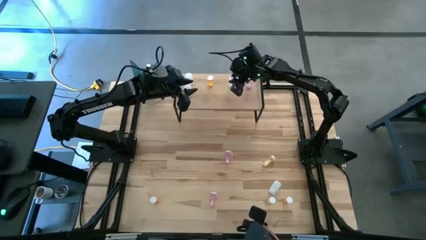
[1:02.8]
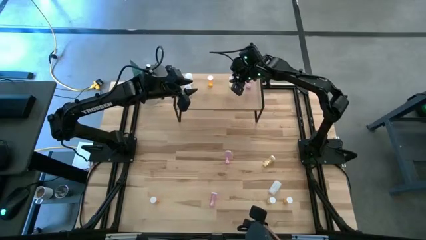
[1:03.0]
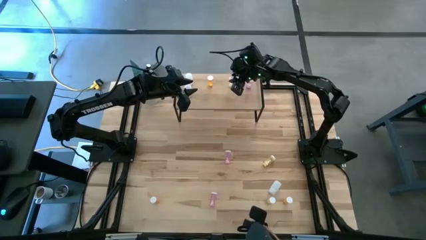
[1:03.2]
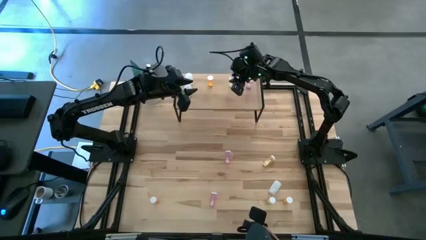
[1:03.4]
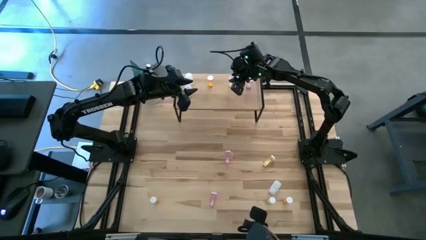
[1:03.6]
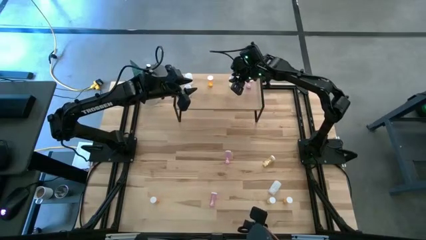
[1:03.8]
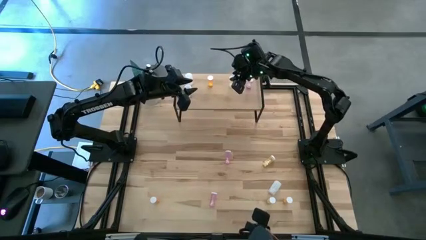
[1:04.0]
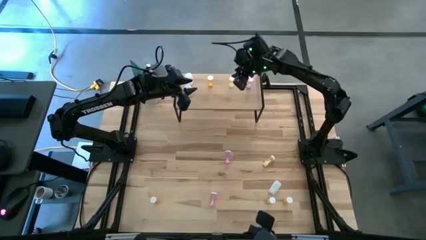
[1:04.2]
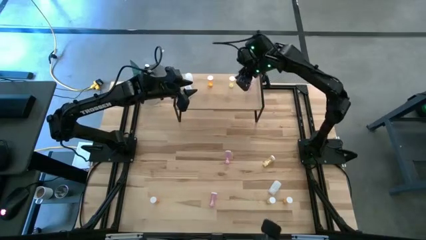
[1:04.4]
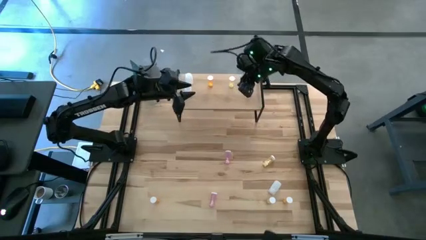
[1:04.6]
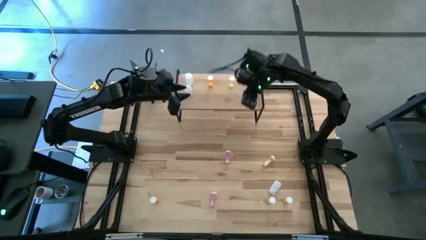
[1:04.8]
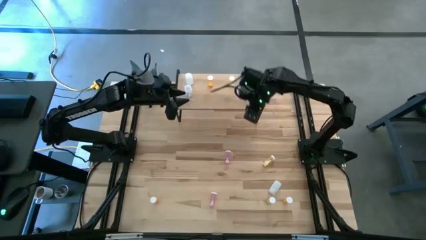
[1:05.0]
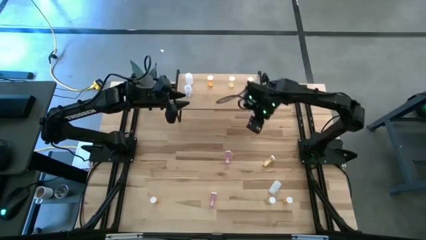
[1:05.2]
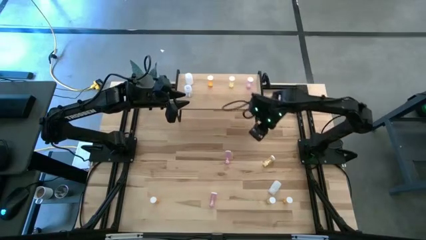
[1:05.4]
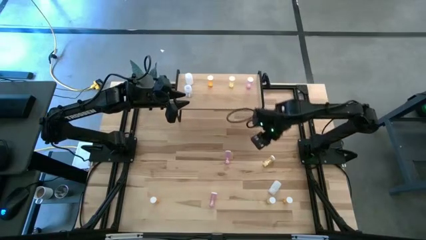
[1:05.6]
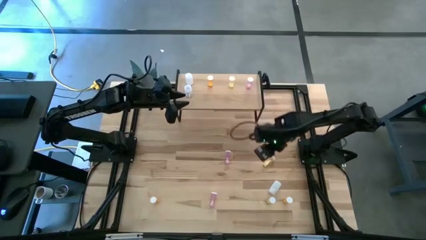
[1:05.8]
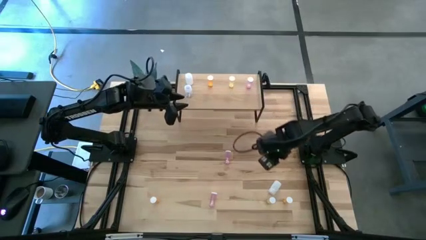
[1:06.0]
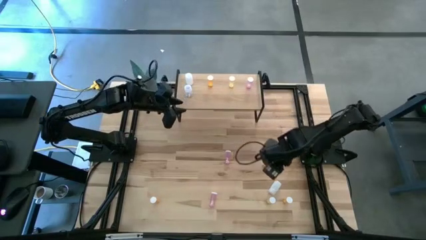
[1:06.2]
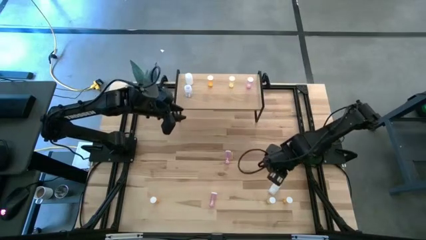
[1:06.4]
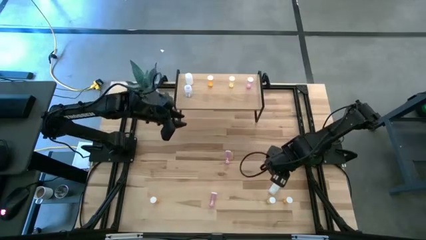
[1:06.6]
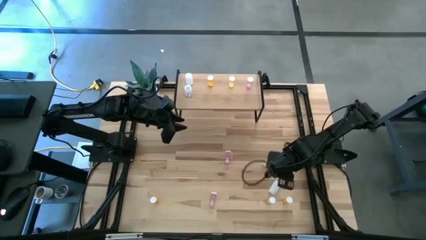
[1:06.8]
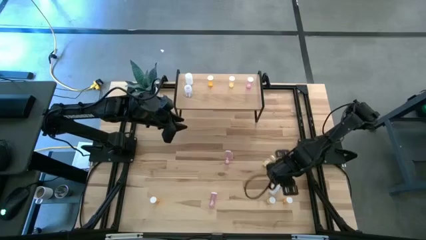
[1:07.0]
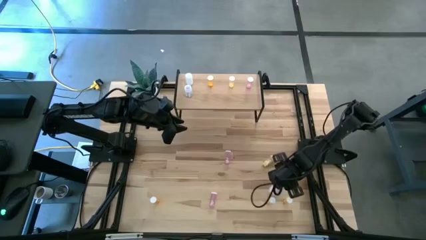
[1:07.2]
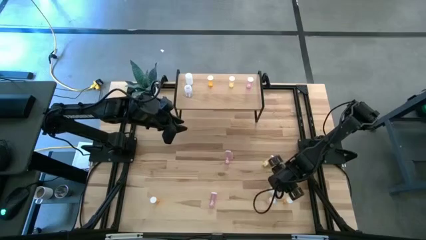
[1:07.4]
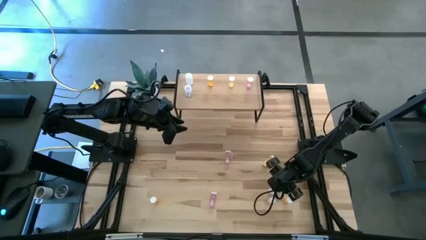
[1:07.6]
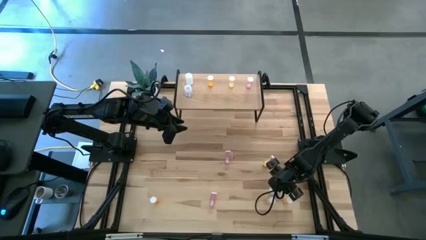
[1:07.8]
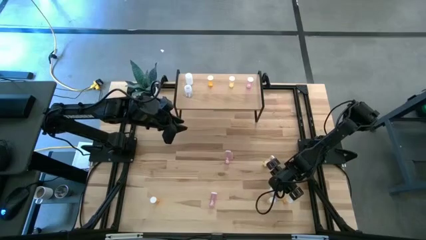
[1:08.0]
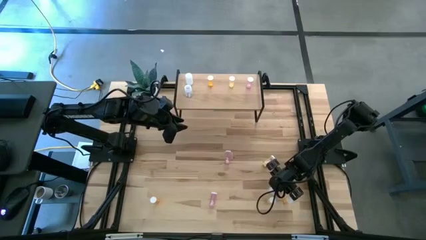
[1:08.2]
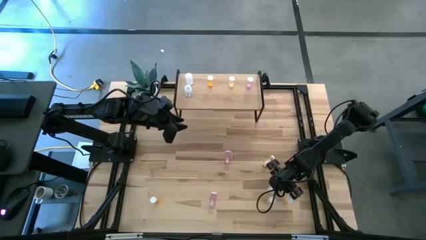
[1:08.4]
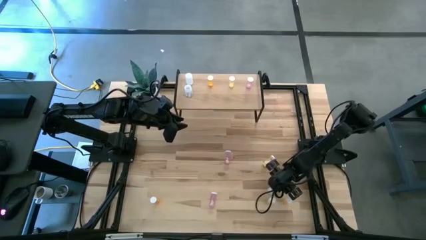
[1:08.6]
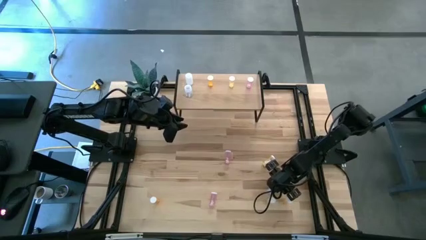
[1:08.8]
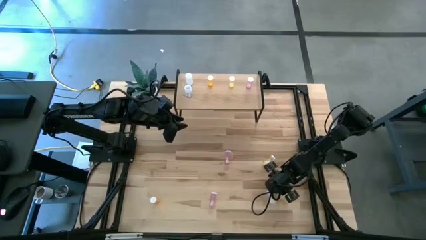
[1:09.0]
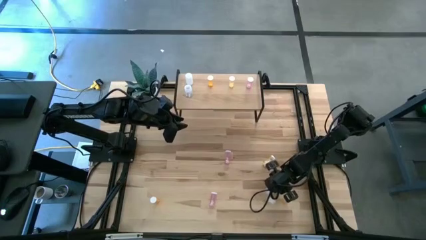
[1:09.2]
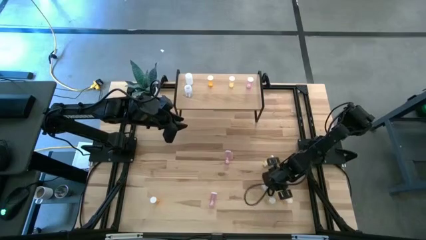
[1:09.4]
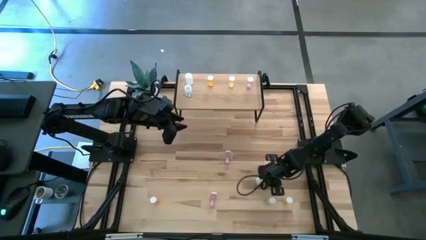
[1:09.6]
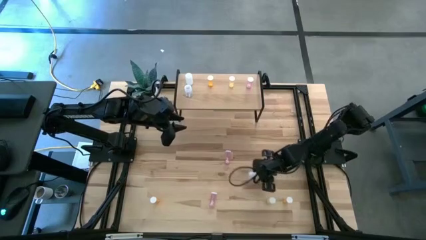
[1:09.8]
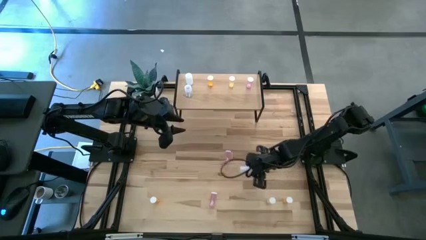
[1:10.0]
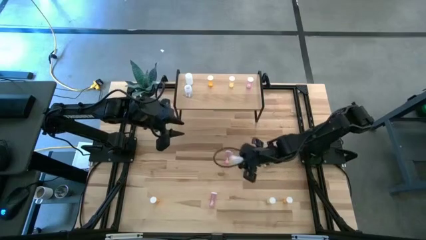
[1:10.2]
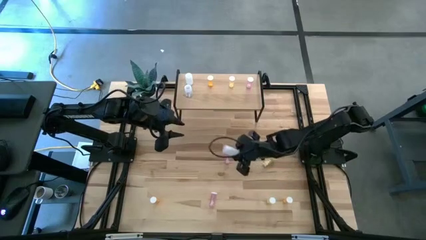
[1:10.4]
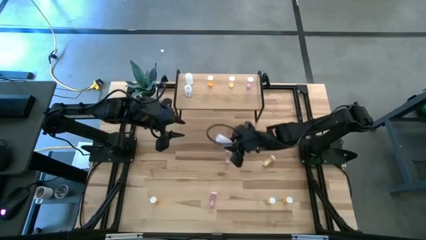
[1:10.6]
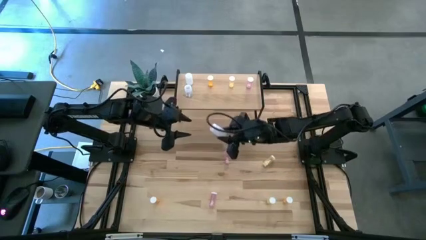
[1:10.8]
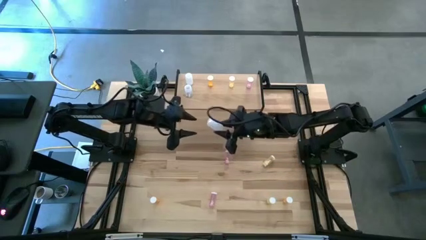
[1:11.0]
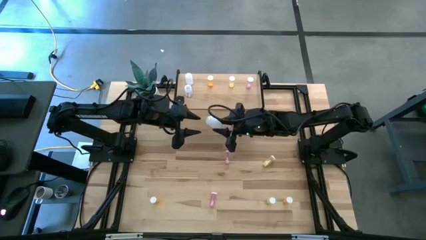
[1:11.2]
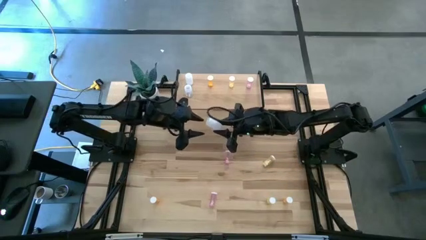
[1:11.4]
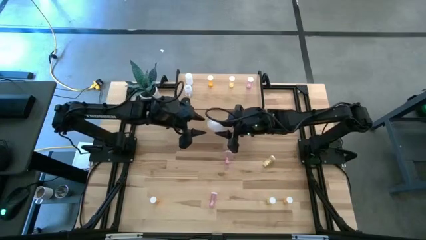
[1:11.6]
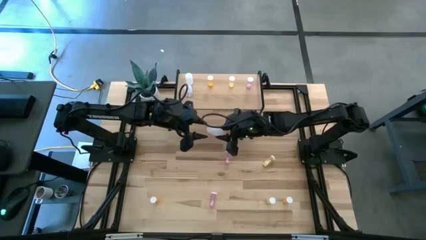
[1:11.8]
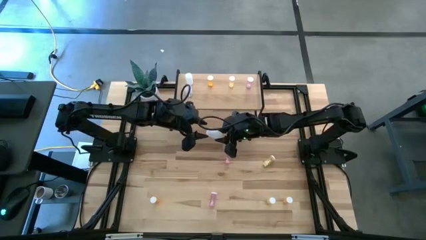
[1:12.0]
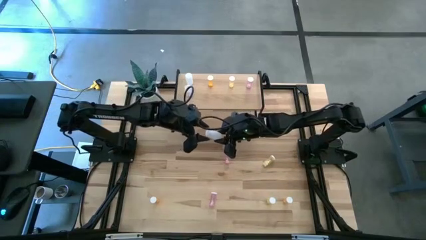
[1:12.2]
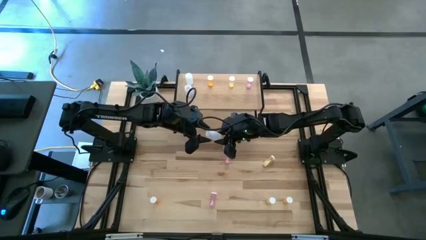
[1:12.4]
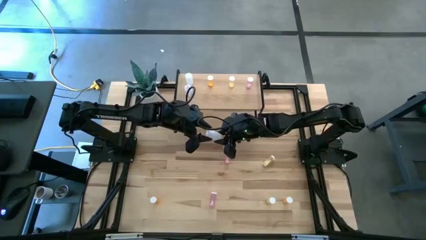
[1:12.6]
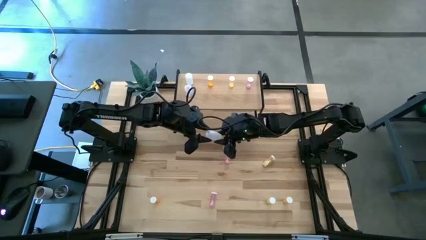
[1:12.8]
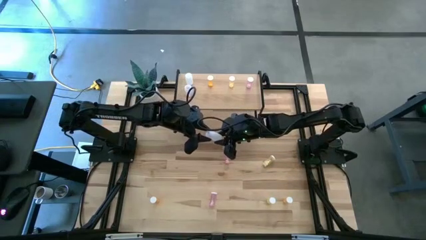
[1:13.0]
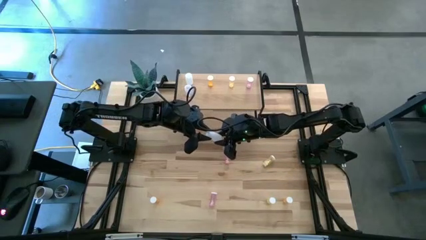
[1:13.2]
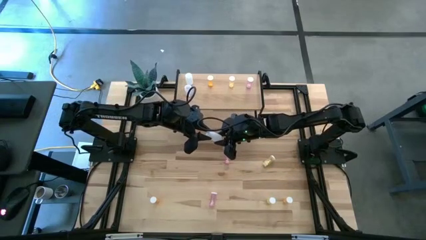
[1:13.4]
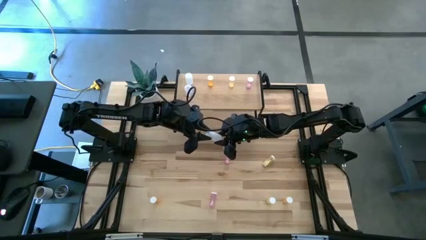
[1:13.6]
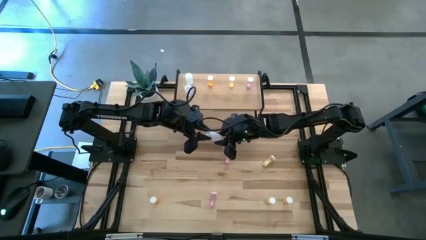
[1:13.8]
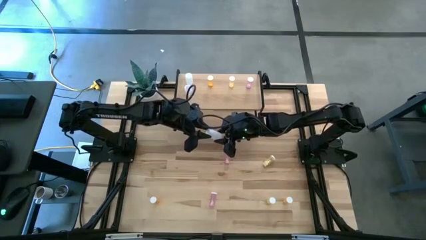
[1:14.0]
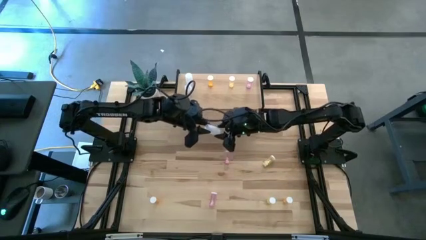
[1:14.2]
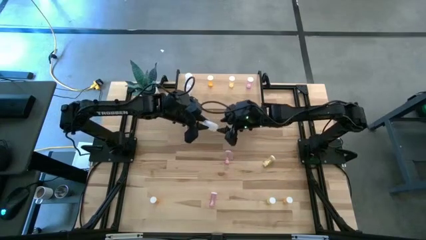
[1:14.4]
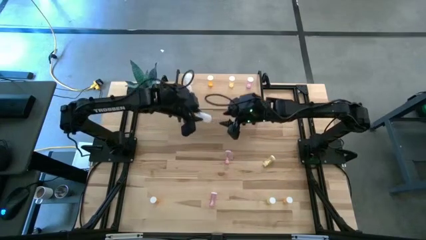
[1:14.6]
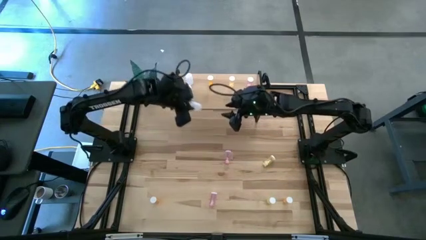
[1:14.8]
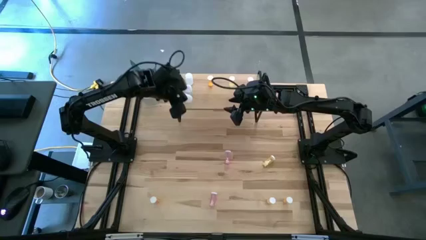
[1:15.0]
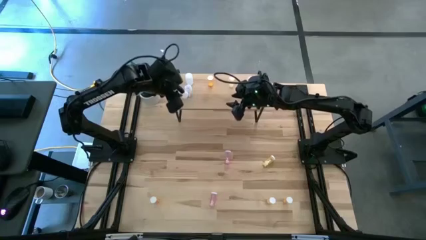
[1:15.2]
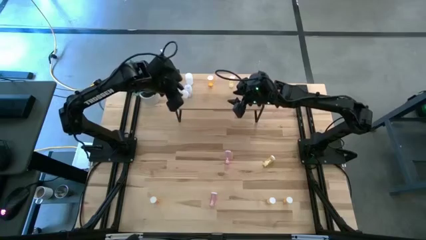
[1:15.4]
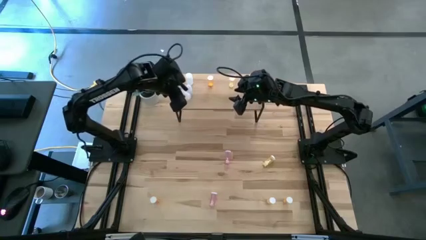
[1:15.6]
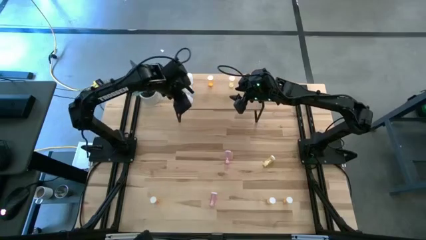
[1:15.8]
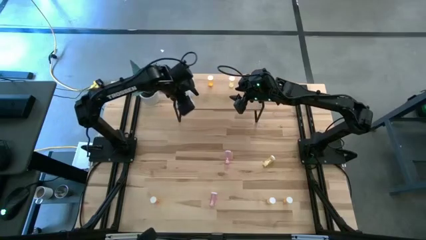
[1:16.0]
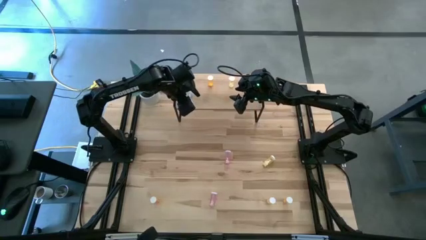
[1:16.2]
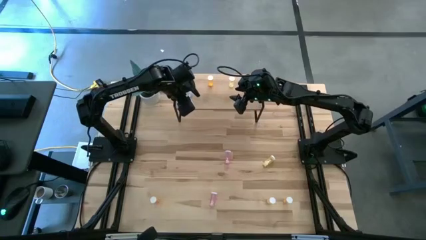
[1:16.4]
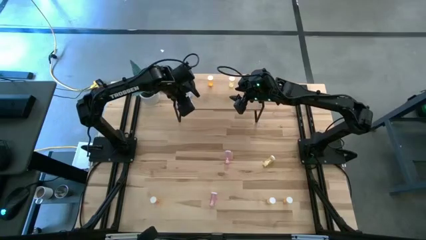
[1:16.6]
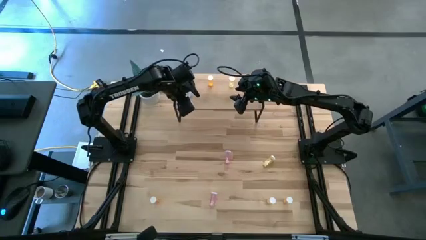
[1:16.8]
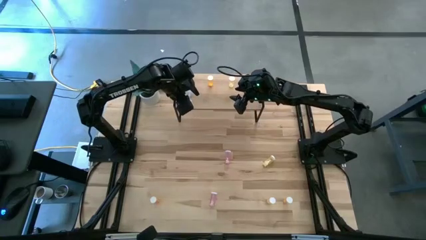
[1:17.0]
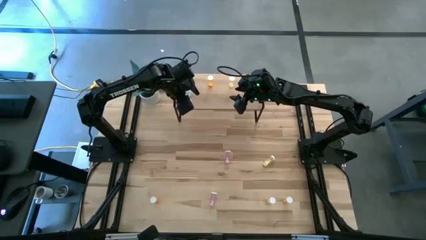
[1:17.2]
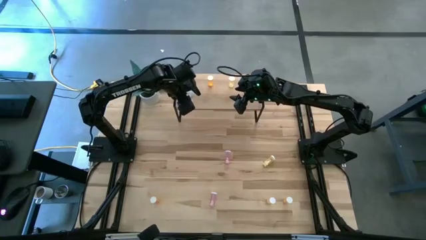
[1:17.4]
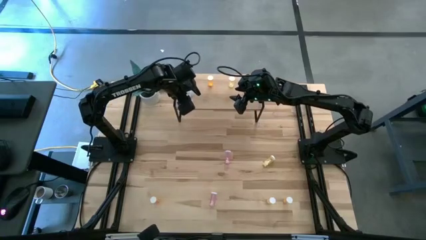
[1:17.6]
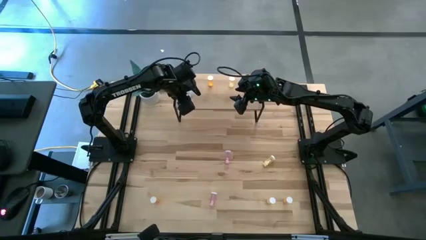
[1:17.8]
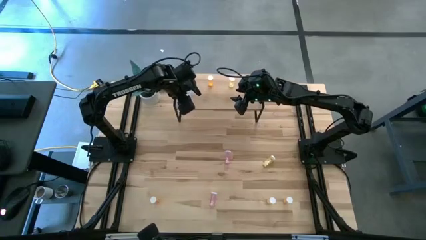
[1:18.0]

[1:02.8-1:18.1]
Task: Pick and place medicine bottles onto shelf by color
Put the white medicine bottle on the shelf aligned with the other white medicine bottle

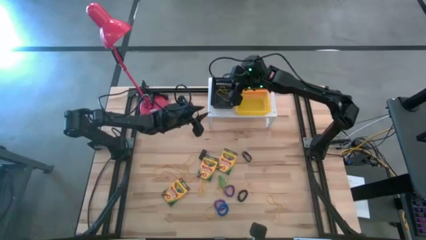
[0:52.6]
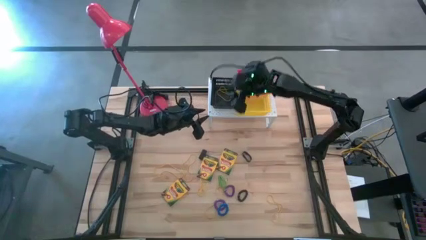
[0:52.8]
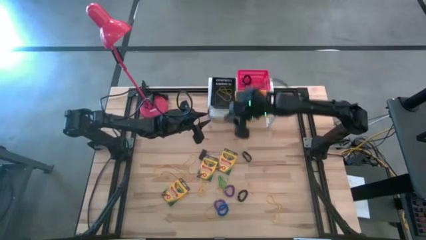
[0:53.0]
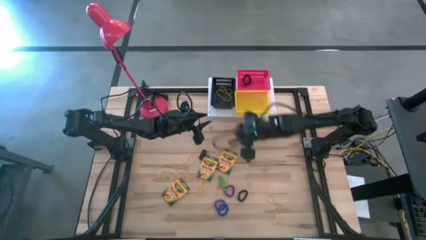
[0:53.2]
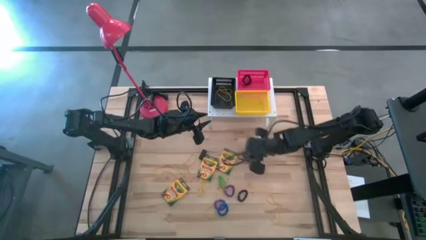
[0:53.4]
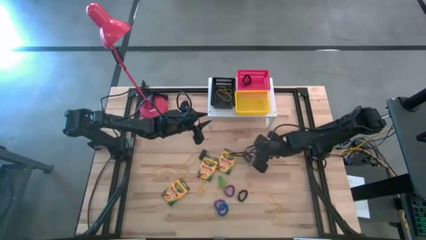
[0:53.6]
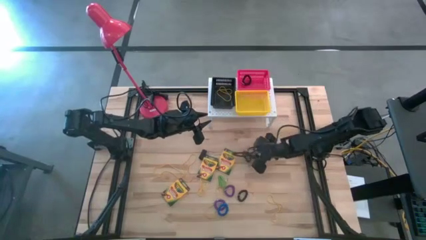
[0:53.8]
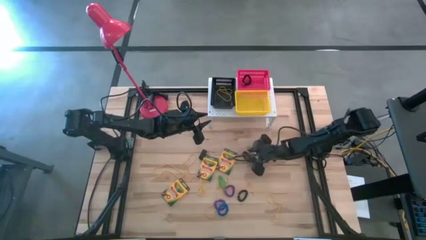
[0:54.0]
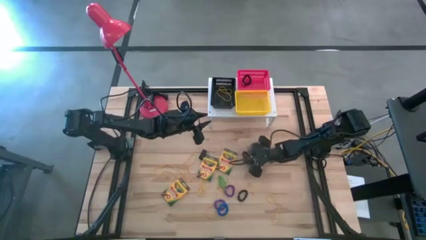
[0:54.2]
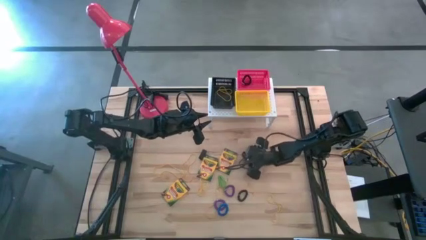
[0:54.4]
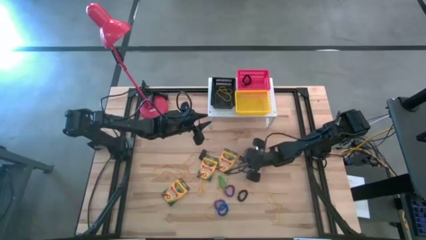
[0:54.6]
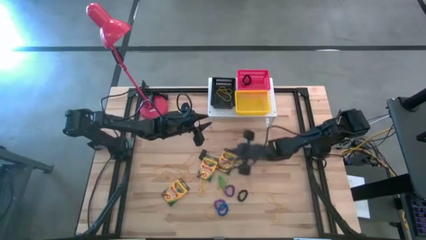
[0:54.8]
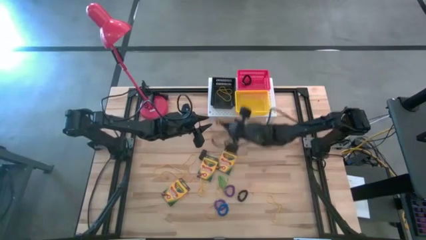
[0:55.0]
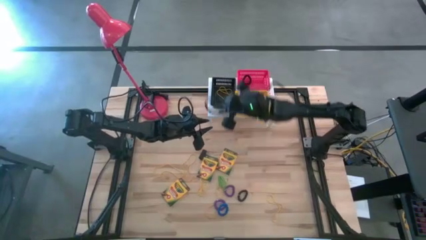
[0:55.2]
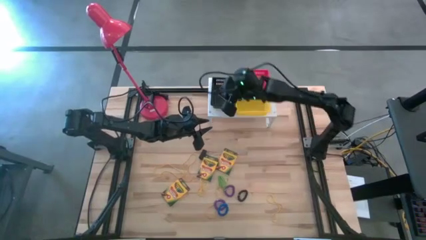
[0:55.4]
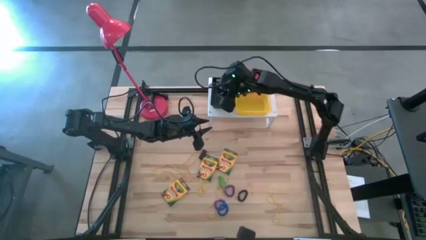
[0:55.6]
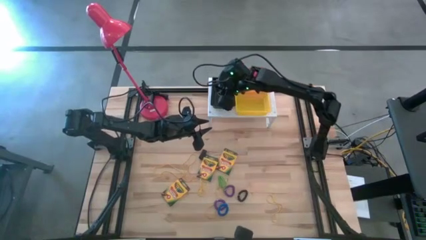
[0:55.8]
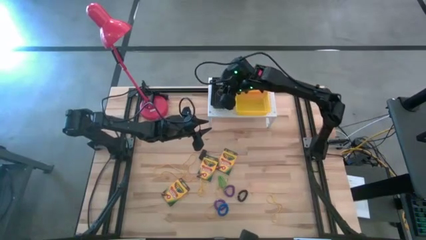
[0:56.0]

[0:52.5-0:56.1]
Task: Pick & Place Office Desk Supplies
Put the black rubber band into the black bin on the shelf
